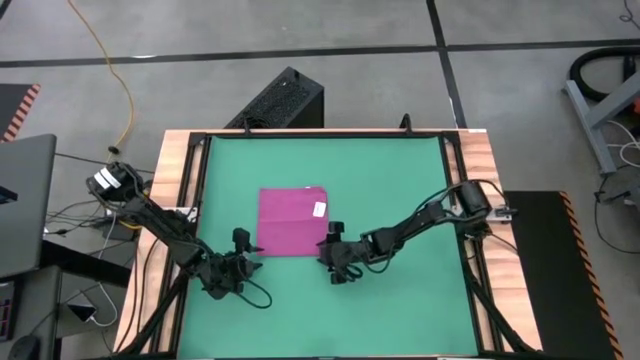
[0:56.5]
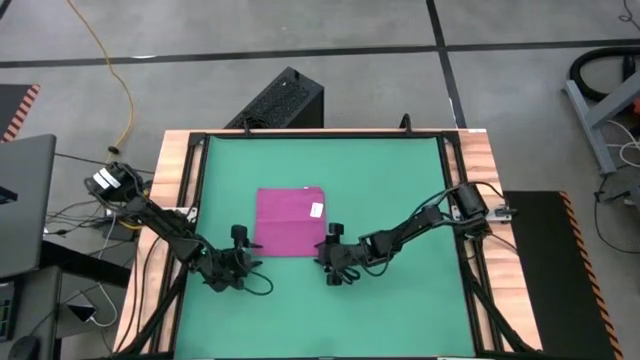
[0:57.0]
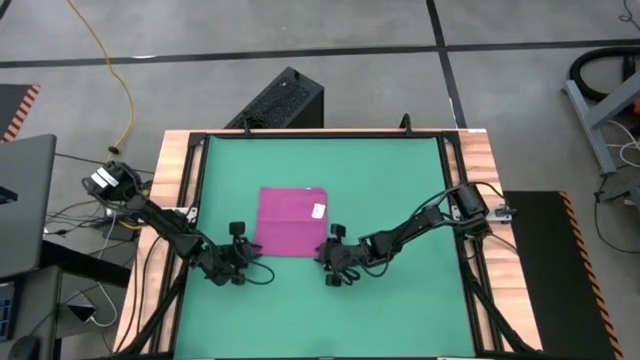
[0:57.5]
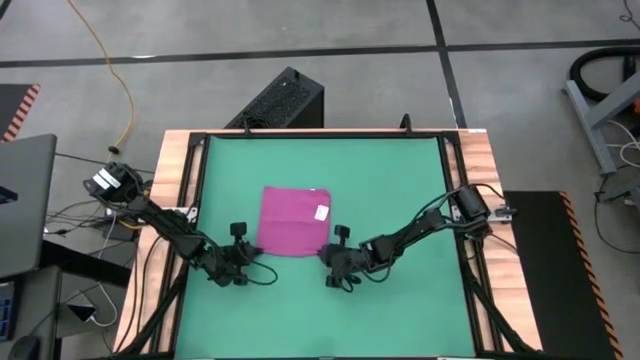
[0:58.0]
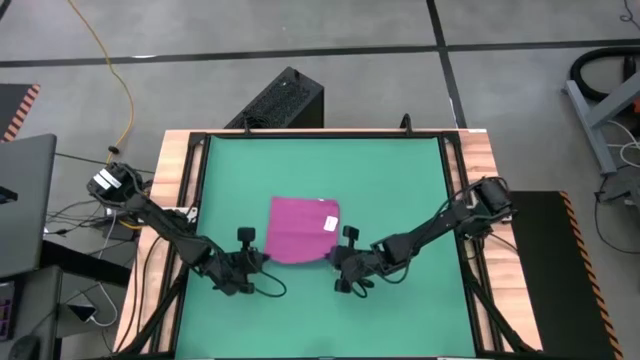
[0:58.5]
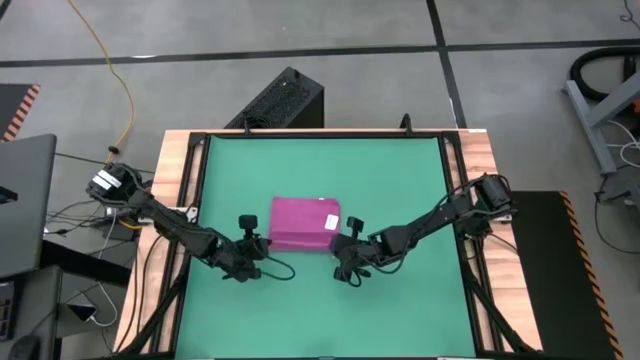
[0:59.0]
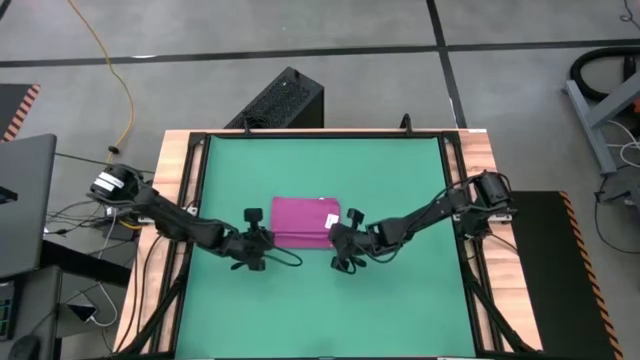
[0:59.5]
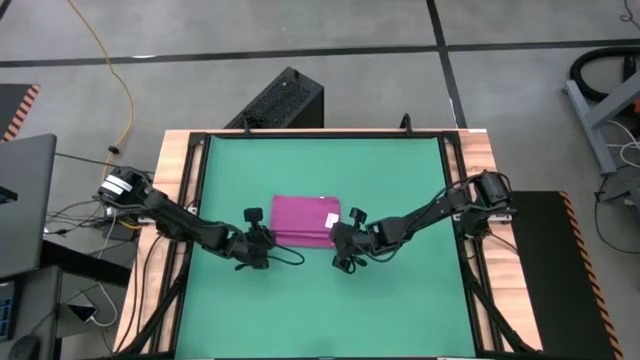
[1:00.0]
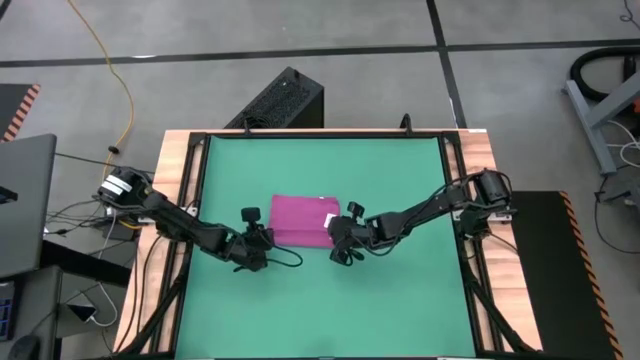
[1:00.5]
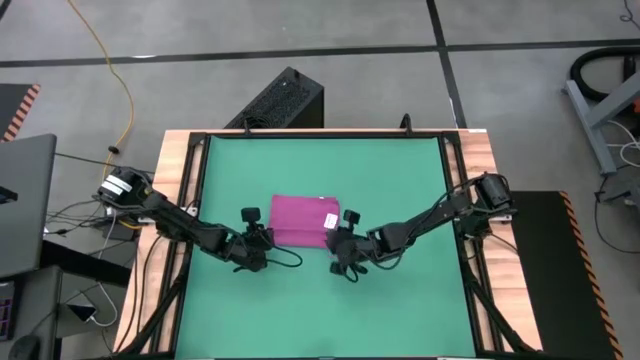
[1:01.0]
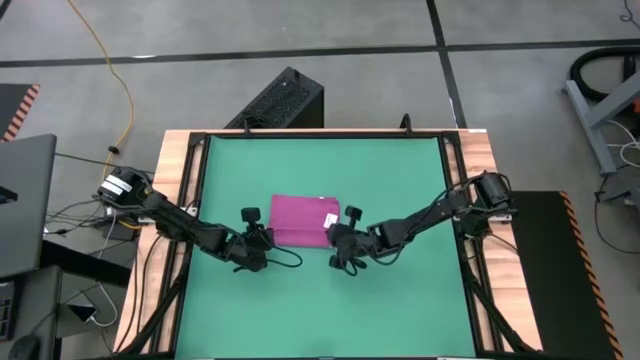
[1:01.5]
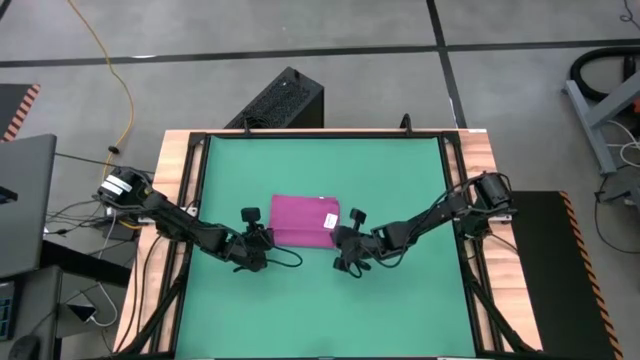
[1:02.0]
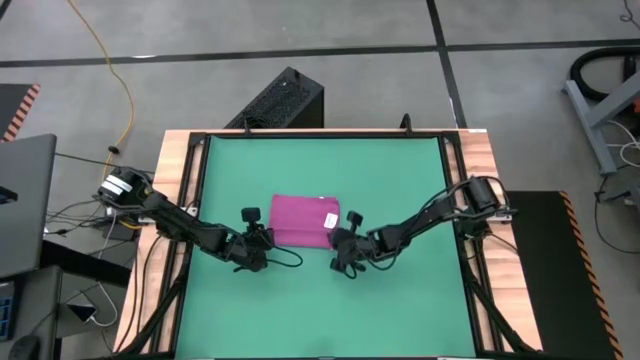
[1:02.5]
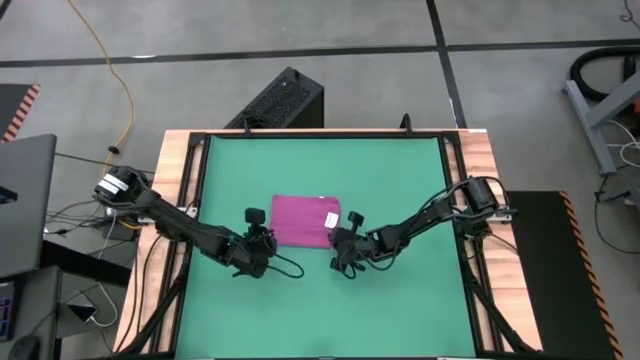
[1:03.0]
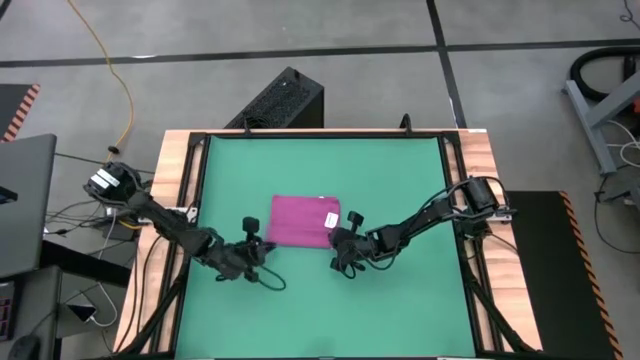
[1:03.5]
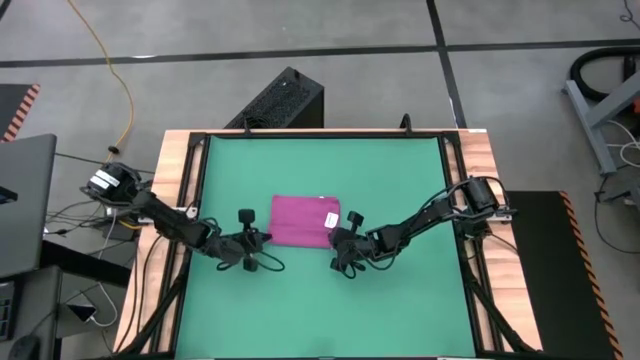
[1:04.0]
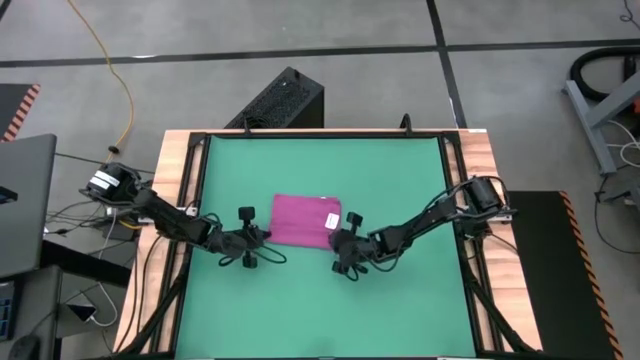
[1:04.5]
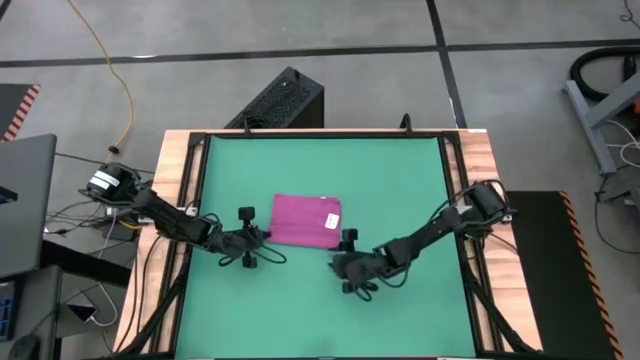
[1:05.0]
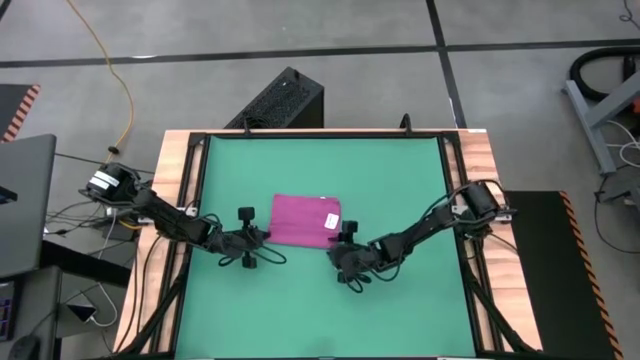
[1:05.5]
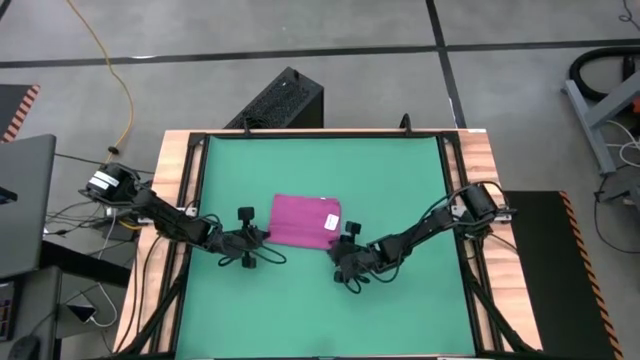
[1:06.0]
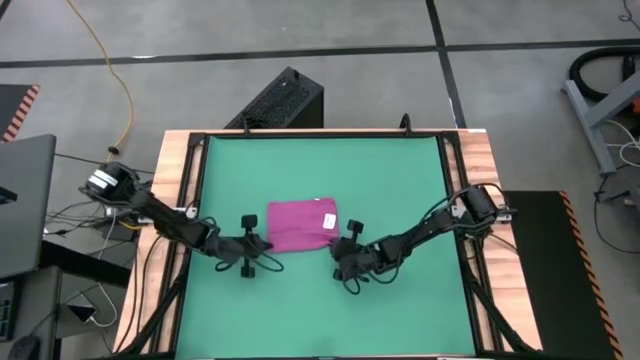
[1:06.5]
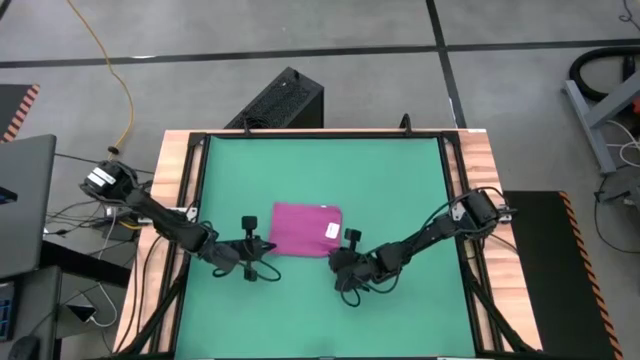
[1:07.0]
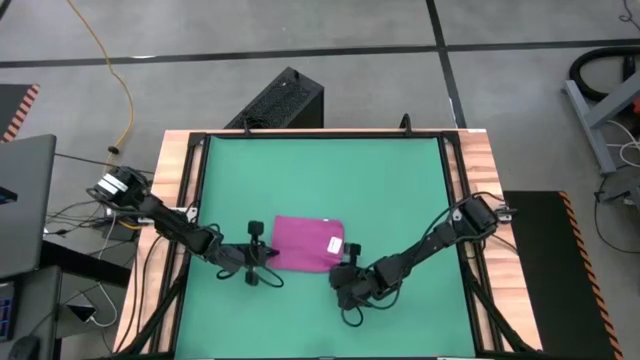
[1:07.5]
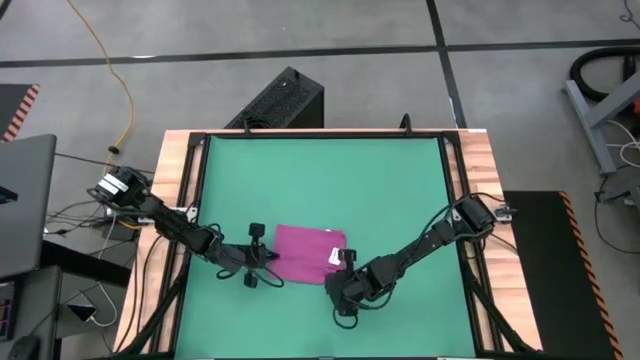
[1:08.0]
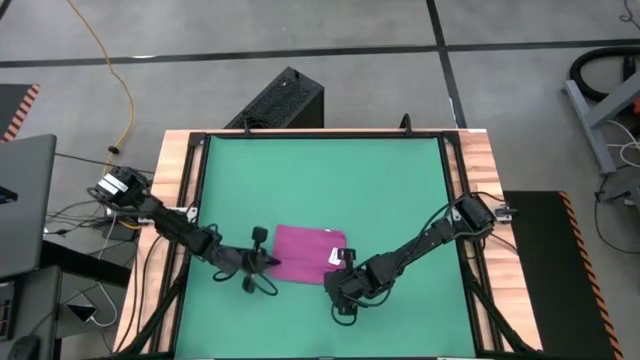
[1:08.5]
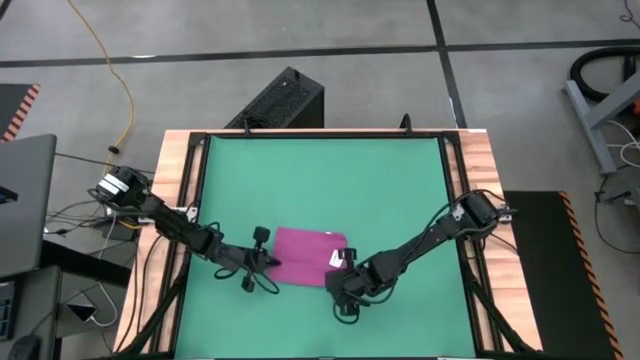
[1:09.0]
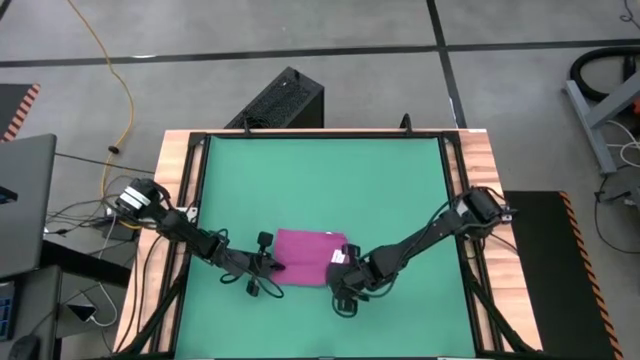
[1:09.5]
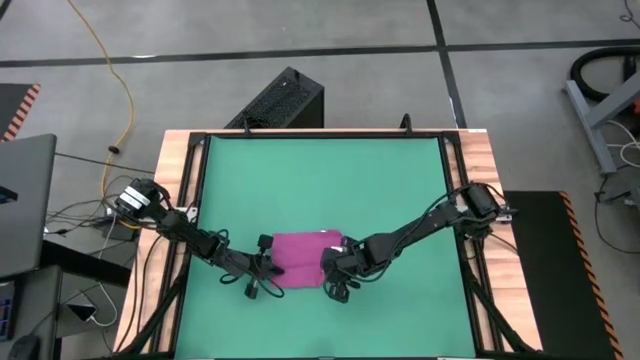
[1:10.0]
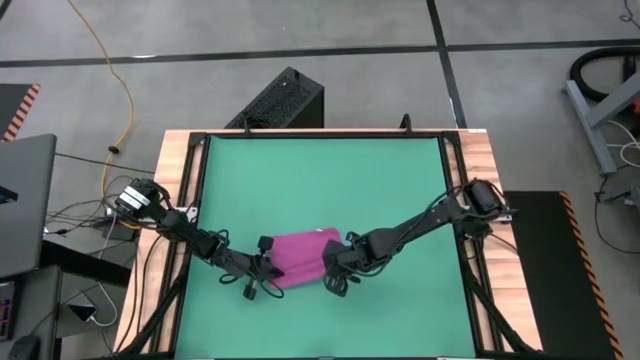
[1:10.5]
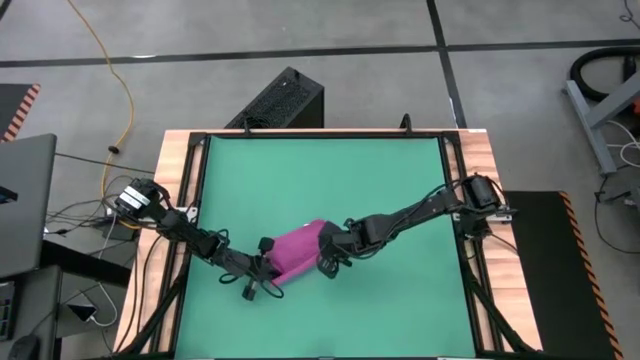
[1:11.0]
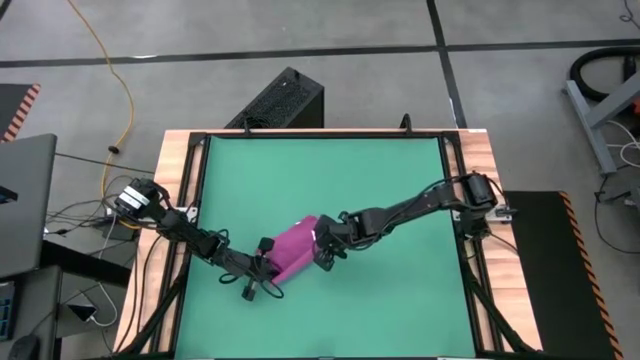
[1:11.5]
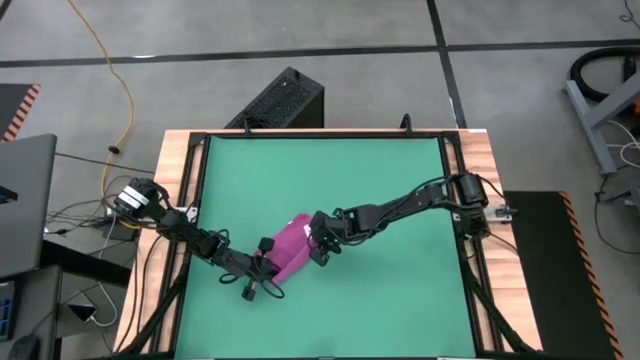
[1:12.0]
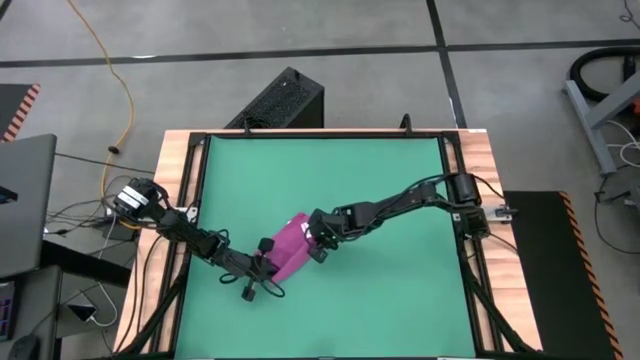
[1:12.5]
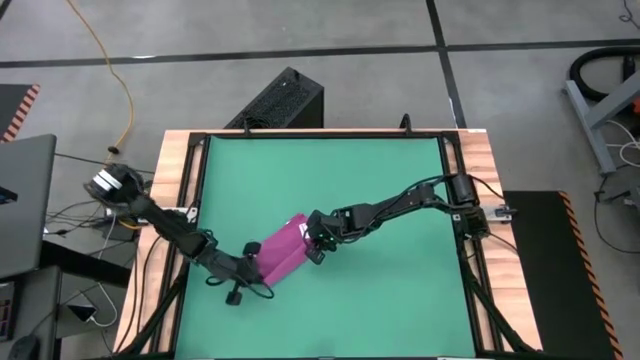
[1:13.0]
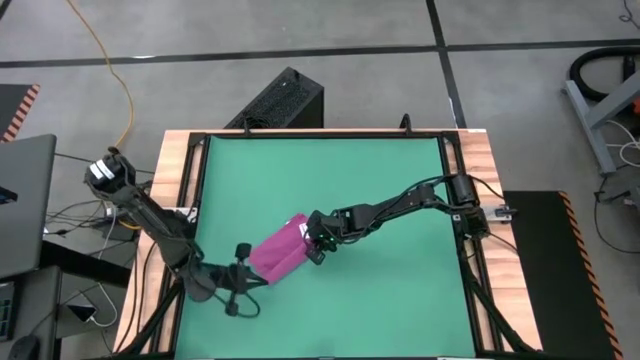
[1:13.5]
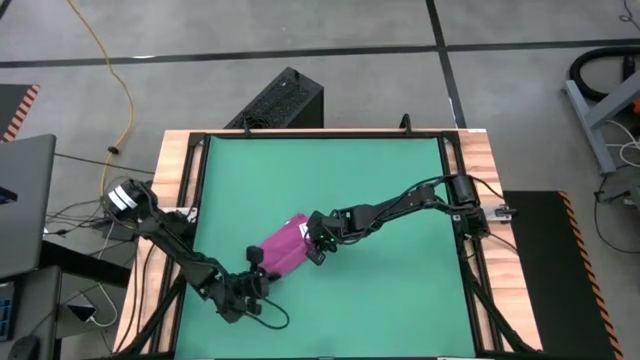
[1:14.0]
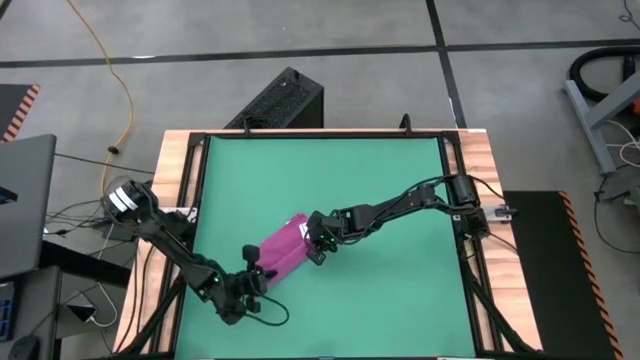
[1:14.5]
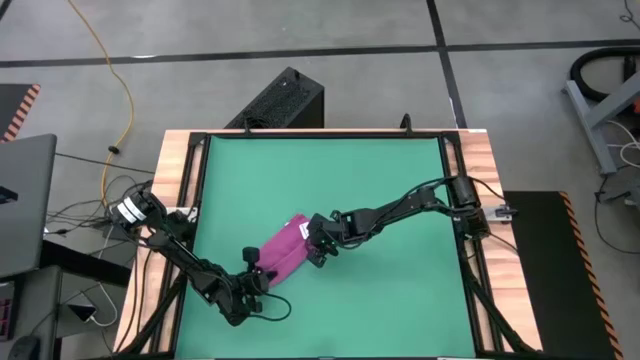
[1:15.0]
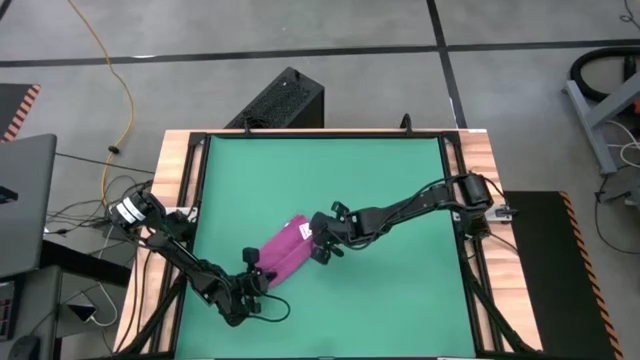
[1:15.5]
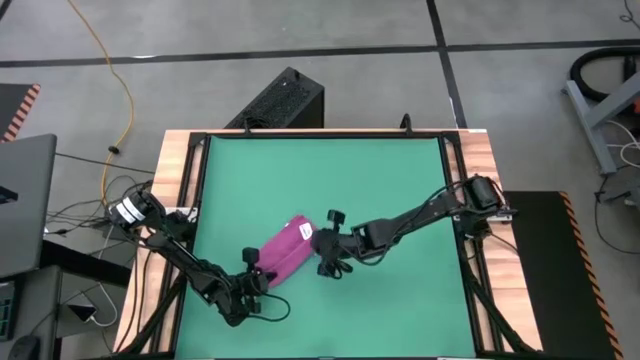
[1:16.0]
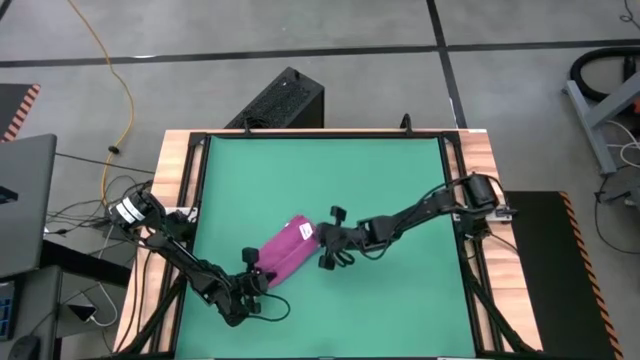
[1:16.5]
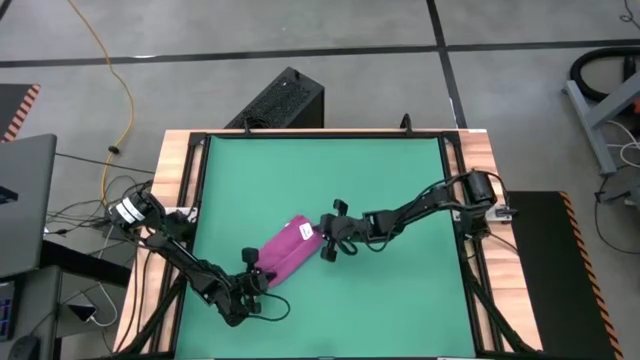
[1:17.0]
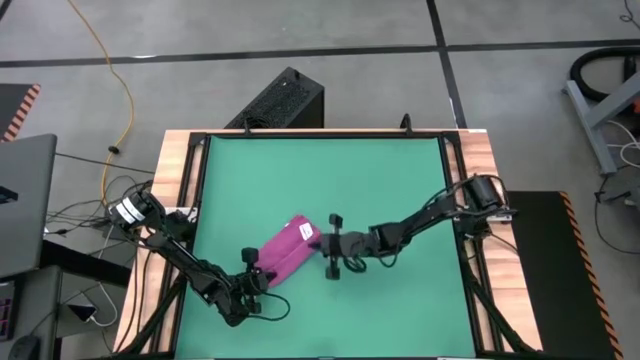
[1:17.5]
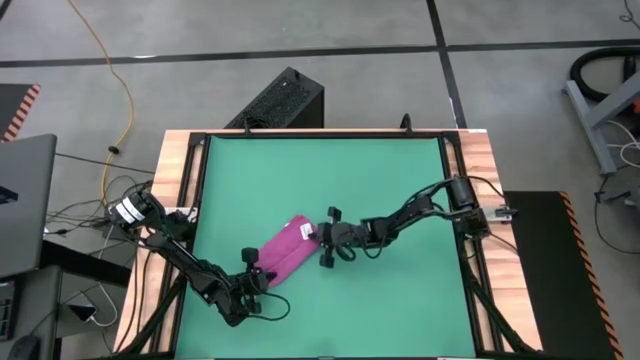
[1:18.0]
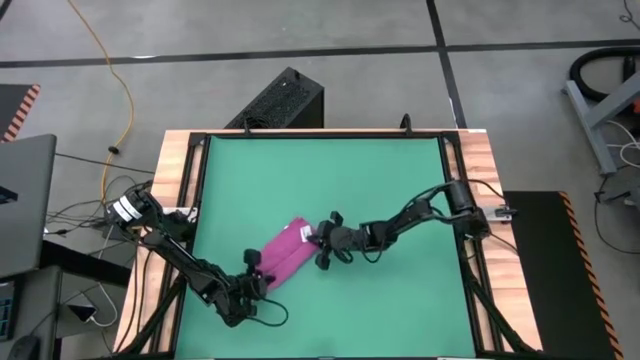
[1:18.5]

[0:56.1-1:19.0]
Task: Roll towel into tight, uniform cylinder
Roll the pink towel
